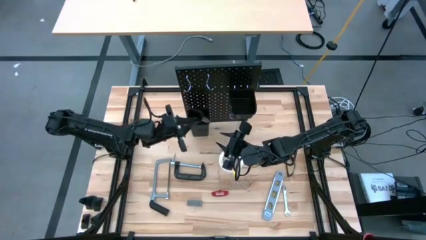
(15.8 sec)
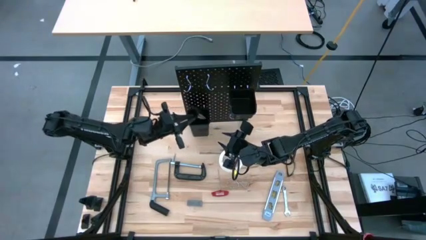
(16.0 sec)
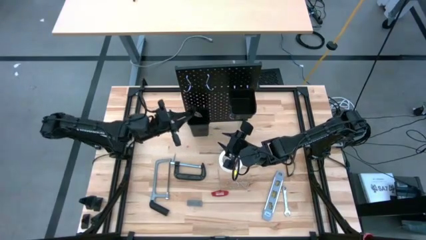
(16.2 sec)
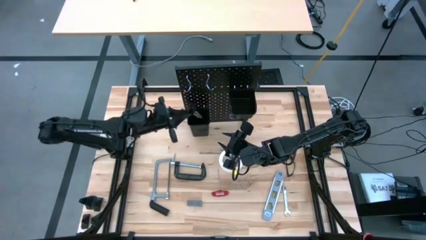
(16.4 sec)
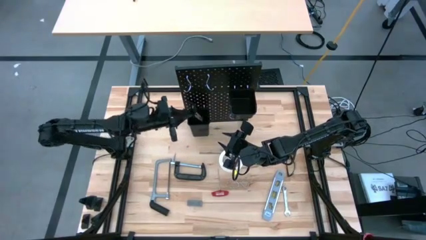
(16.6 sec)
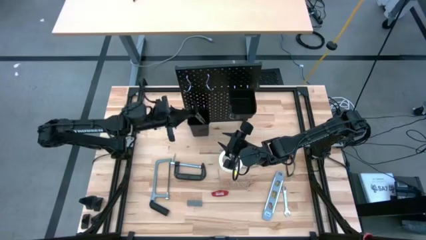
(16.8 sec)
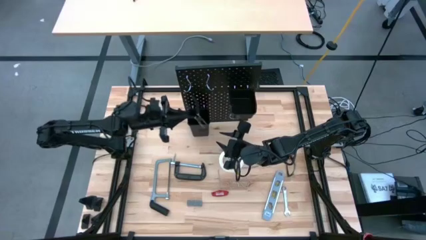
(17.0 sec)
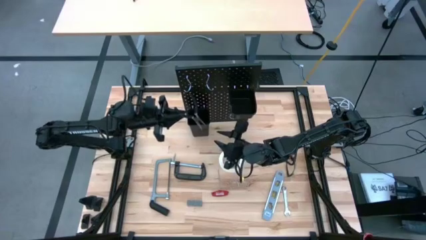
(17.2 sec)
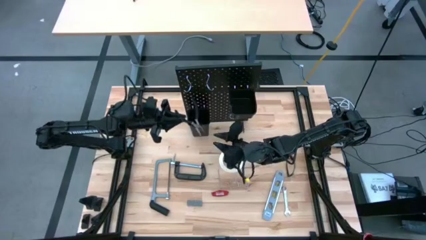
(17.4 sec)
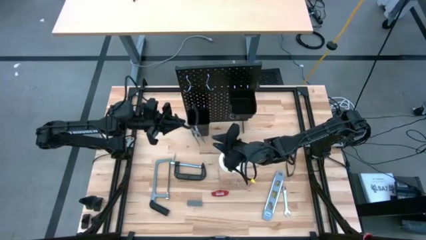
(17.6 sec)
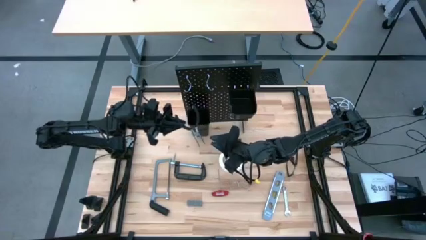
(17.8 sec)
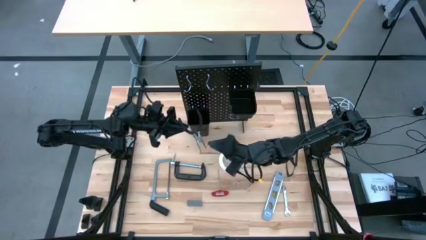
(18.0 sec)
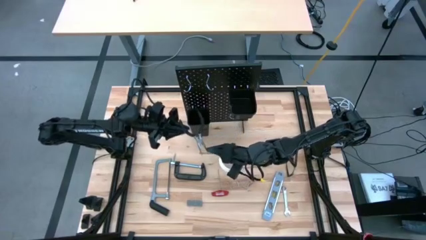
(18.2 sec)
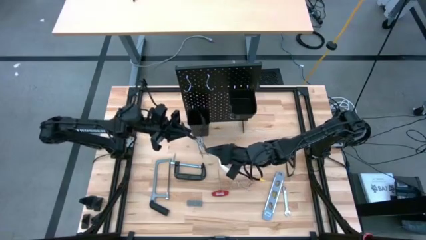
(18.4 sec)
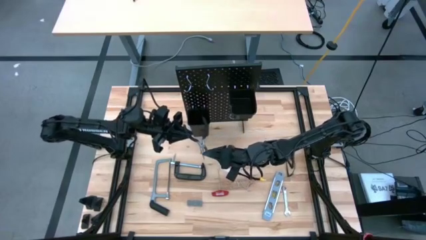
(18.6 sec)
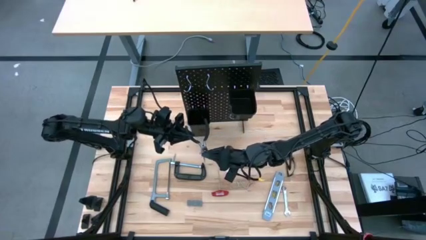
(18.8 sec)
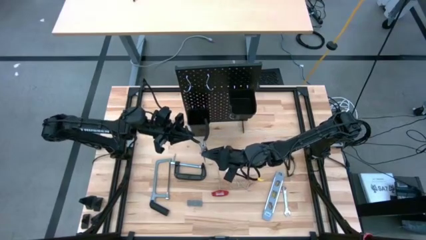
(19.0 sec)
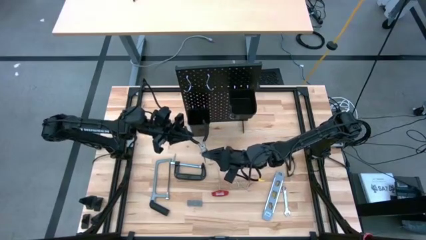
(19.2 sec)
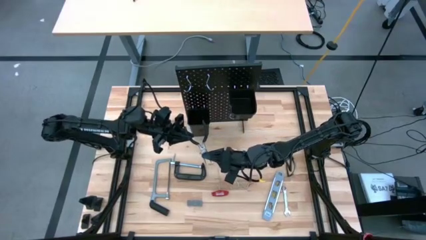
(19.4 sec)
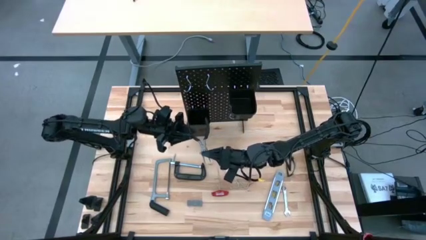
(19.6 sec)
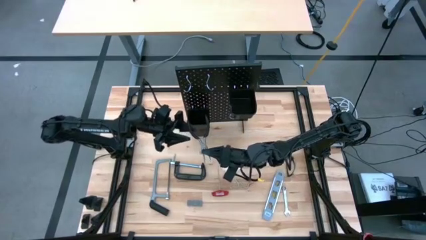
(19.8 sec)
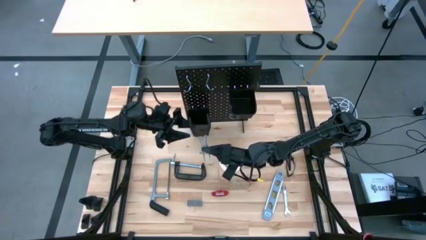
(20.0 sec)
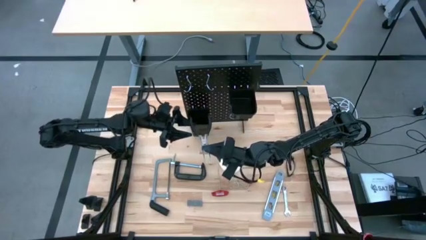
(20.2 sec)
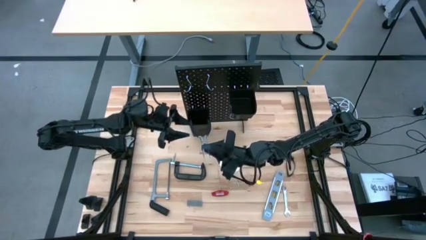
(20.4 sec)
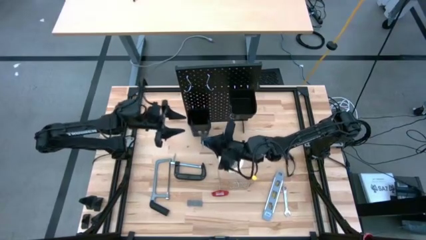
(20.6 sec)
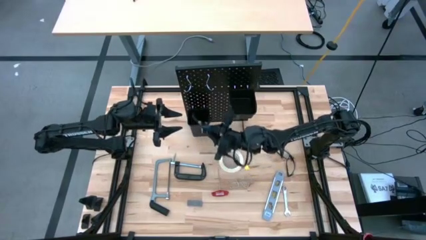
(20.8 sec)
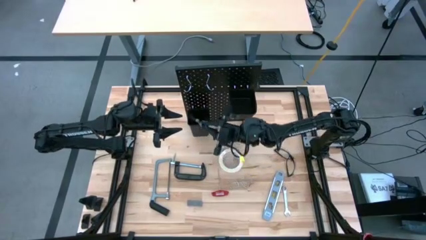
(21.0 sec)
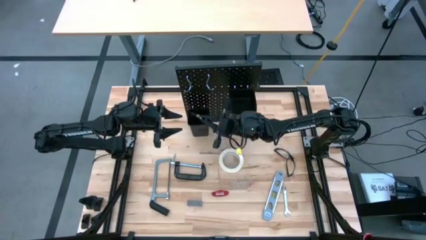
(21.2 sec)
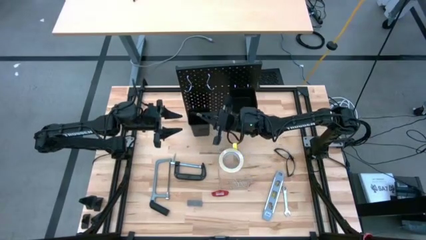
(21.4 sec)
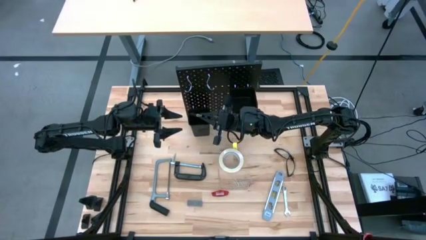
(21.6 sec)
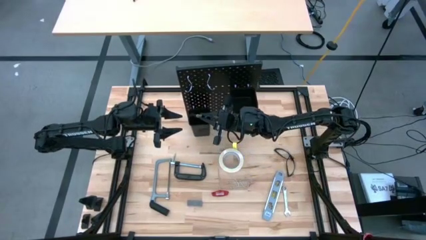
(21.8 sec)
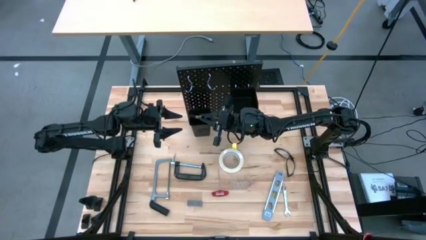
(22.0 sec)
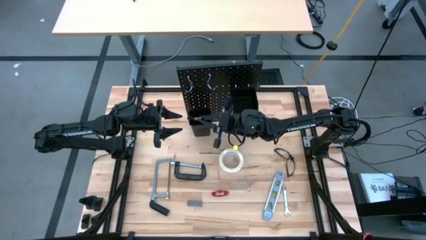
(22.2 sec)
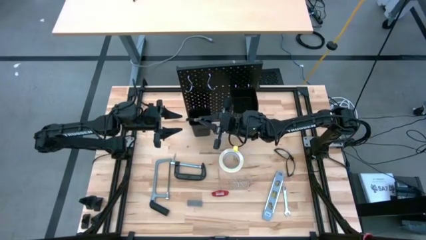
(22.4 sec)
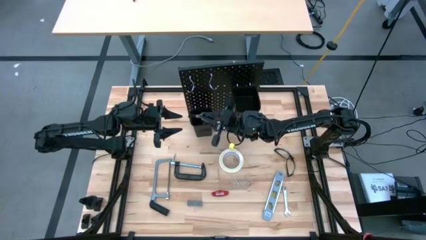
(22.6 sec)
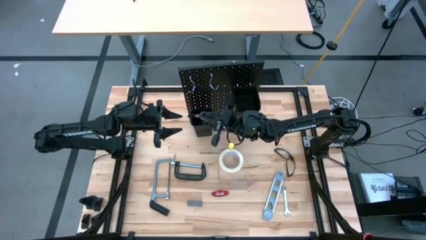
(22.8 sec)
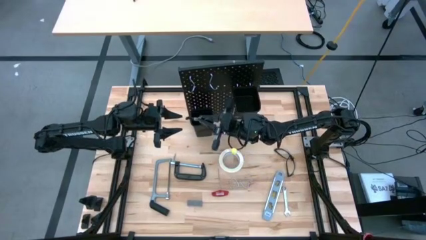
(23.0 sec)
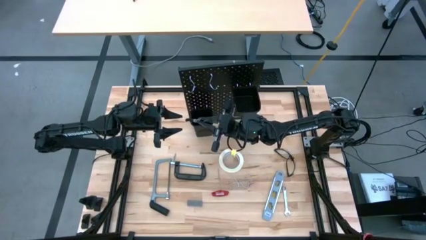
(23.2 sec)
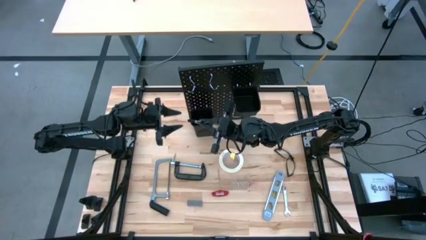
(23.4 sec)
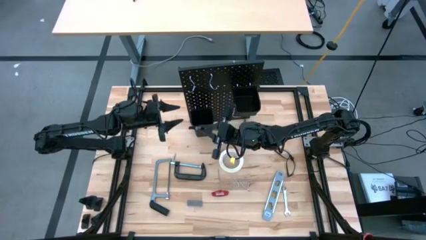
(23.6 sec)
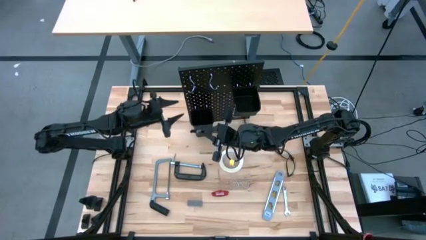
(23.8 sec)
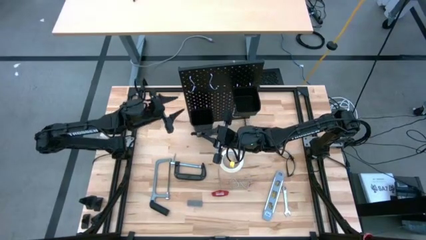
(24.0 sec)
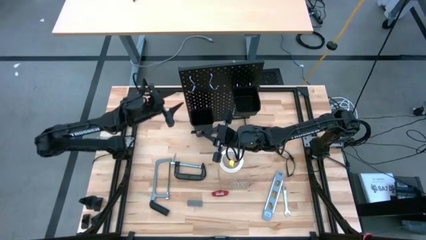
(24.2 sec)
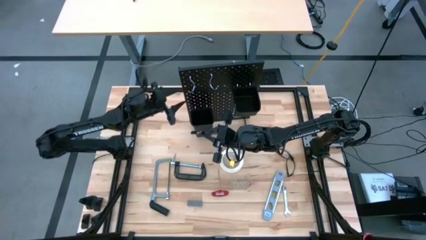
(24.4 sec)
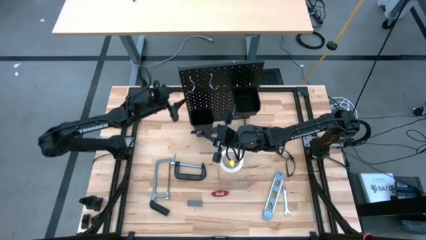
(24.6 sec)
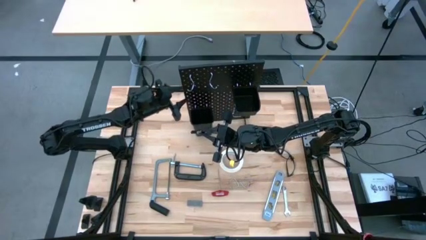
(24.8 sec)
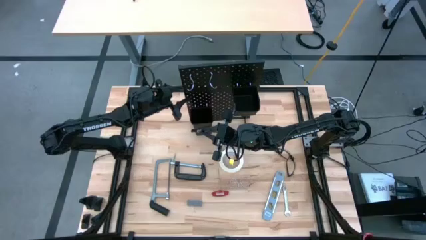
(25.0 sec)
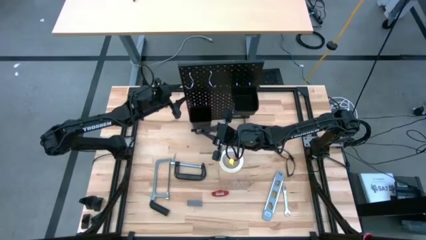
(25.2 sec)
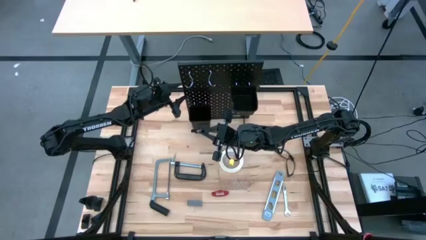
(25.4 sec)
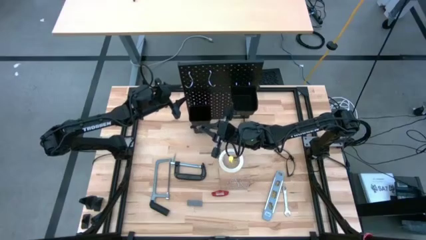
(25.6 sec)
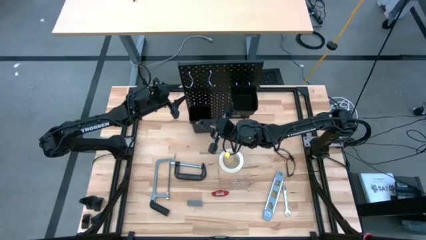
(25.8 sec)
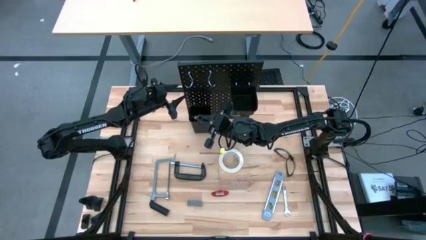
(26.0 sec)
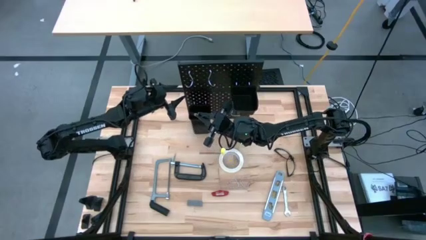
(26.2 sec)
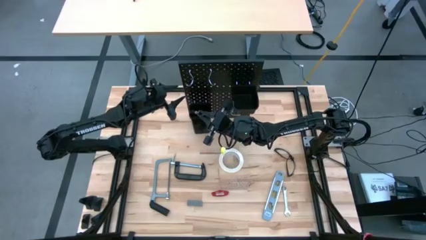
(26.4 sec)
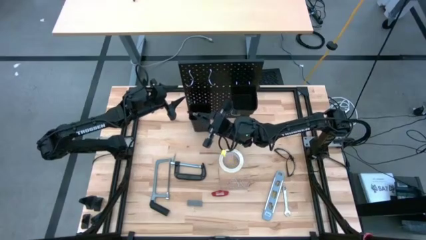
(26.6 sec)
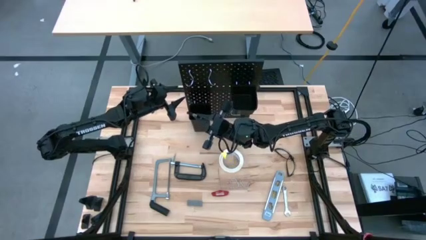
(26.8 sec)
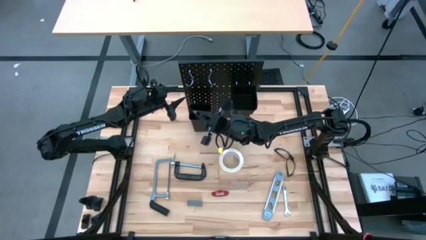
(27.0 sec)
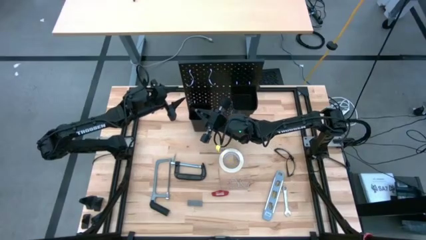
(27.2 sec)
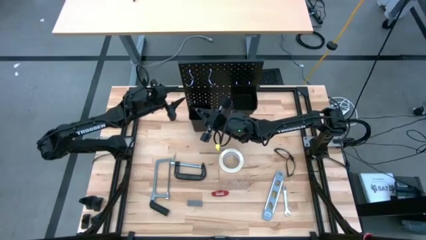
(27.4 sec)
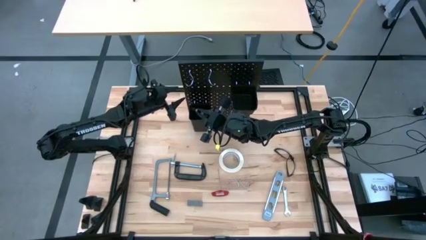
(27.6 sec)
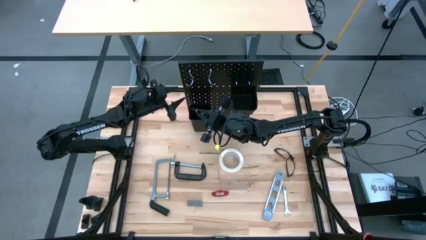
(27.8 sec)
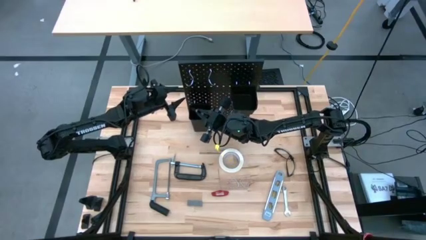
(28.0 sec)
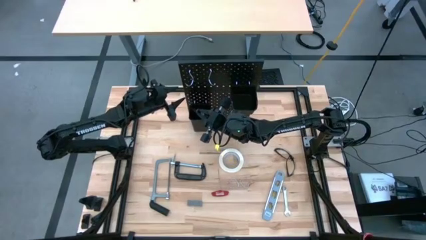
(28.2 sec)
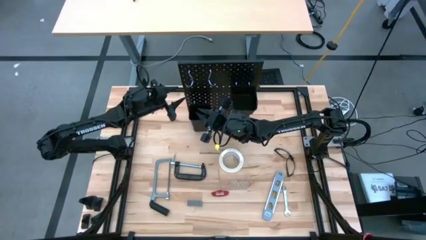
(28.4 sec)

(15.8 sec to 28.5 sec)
Task: Hang tools onto peg board
Put the black pliers into the left black tool bin
